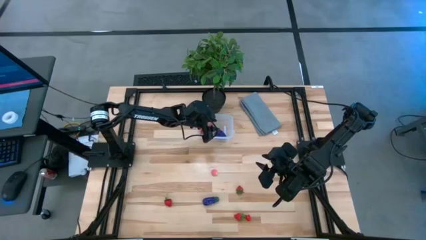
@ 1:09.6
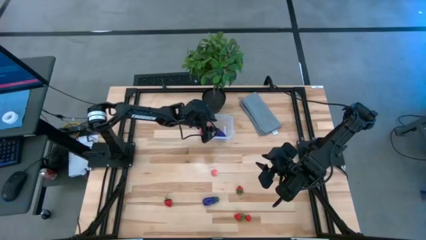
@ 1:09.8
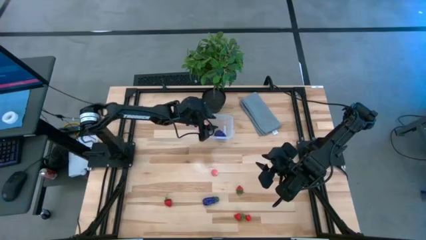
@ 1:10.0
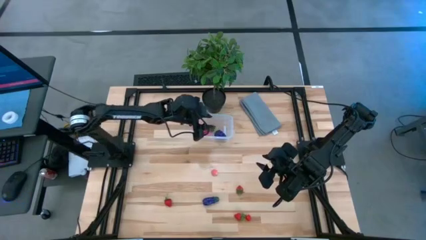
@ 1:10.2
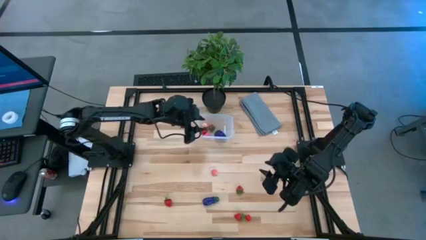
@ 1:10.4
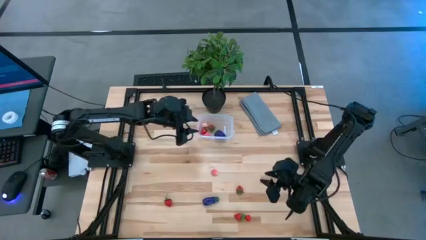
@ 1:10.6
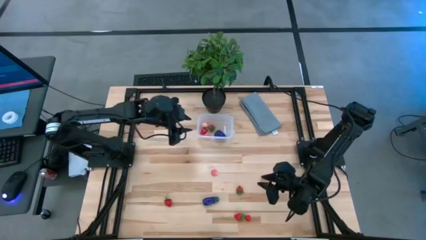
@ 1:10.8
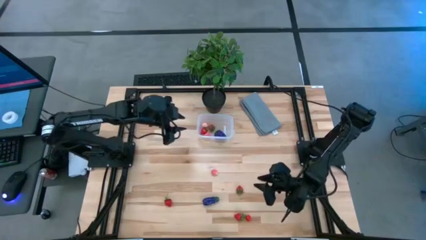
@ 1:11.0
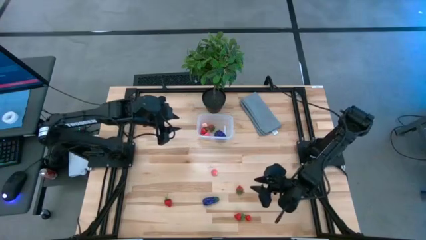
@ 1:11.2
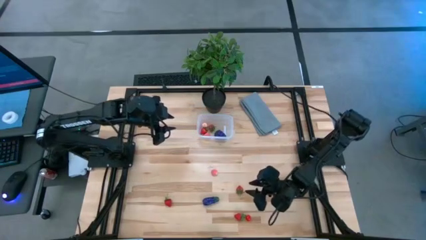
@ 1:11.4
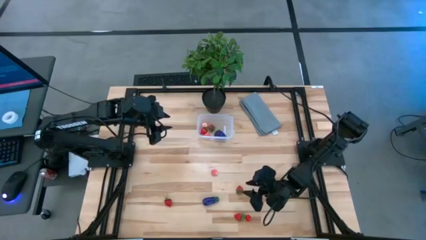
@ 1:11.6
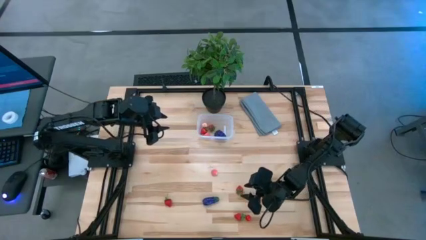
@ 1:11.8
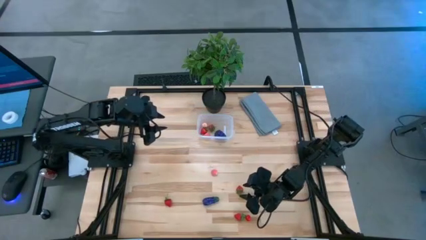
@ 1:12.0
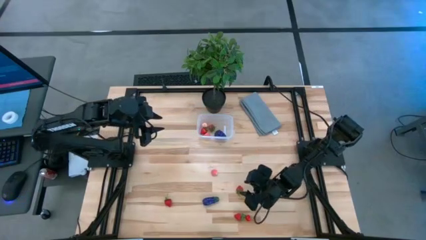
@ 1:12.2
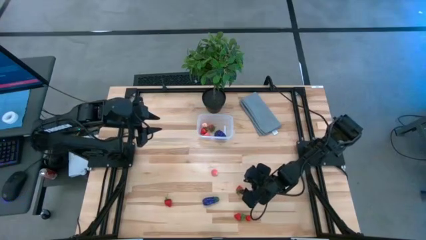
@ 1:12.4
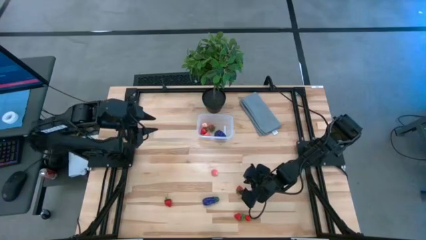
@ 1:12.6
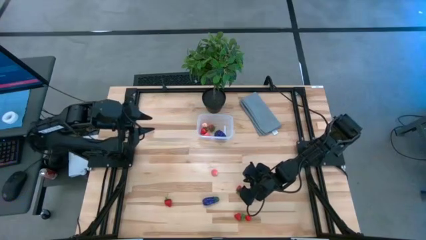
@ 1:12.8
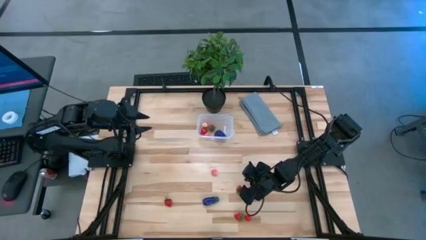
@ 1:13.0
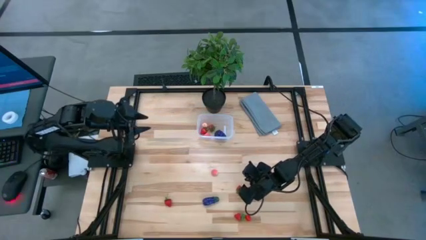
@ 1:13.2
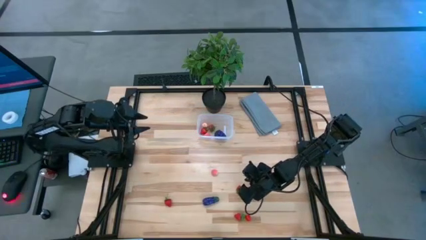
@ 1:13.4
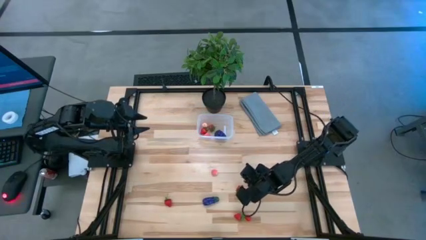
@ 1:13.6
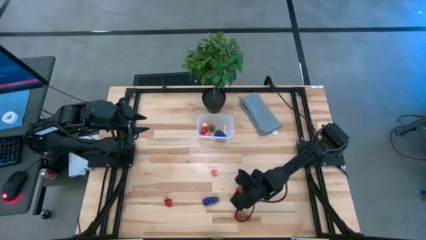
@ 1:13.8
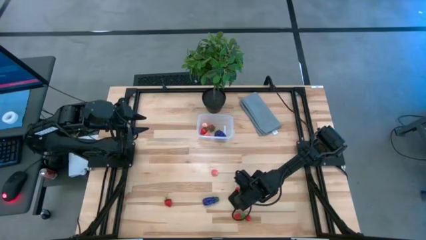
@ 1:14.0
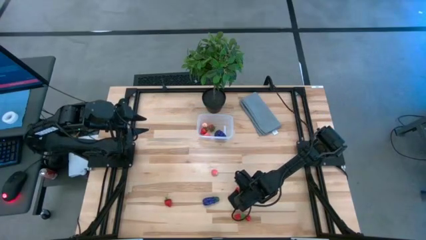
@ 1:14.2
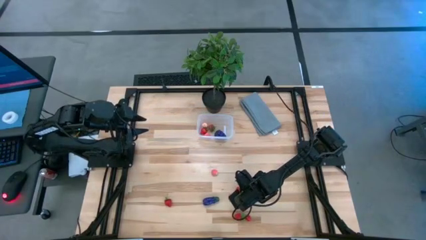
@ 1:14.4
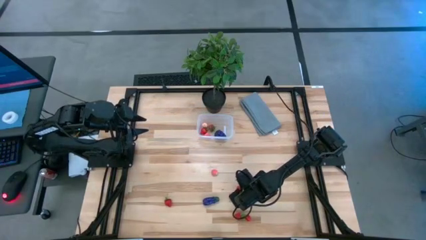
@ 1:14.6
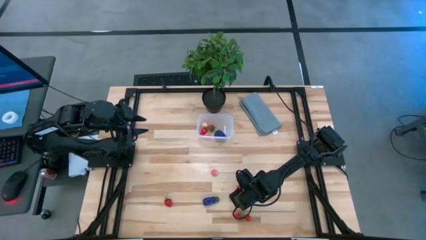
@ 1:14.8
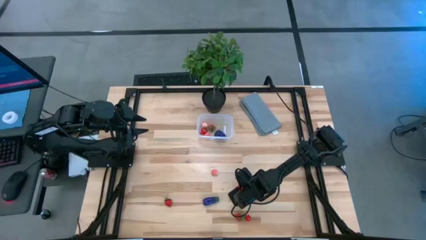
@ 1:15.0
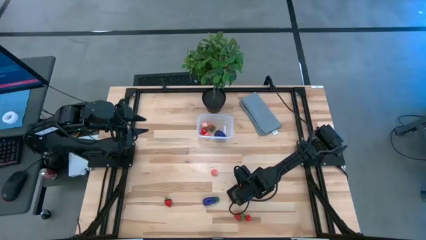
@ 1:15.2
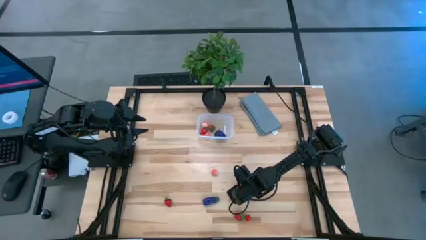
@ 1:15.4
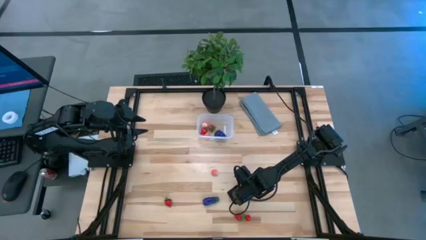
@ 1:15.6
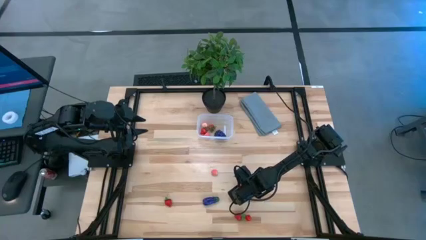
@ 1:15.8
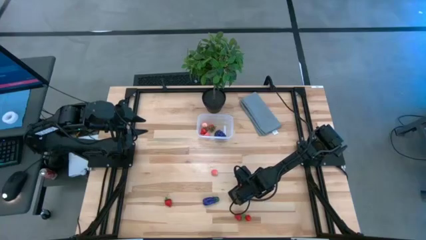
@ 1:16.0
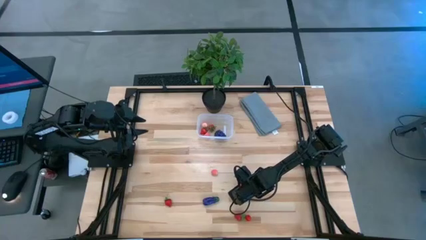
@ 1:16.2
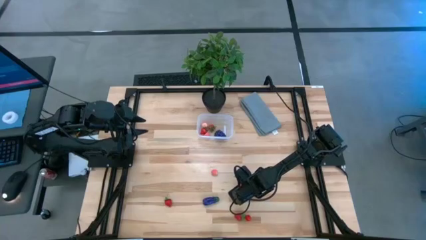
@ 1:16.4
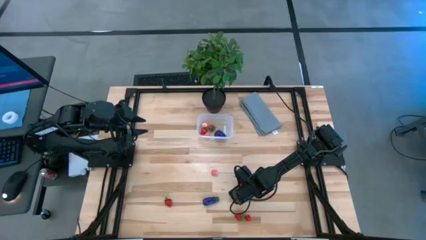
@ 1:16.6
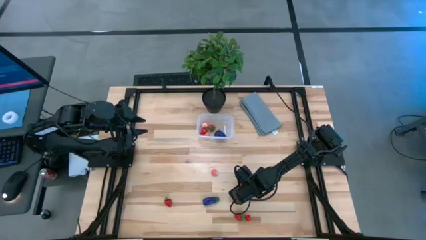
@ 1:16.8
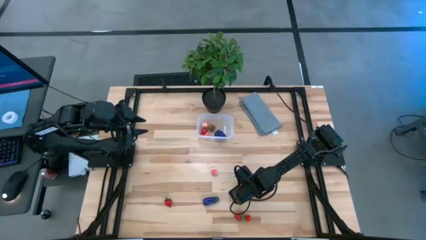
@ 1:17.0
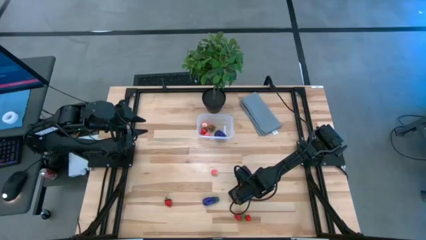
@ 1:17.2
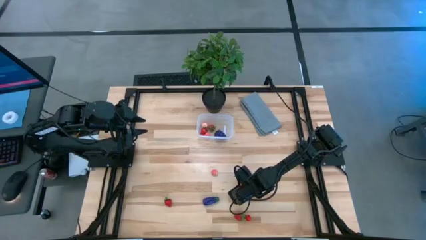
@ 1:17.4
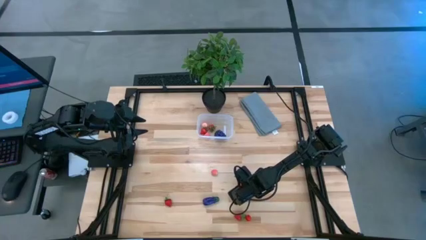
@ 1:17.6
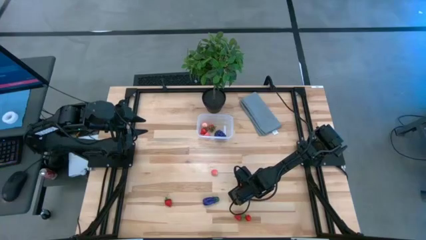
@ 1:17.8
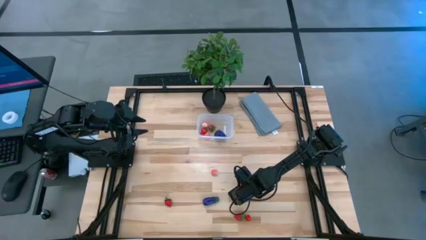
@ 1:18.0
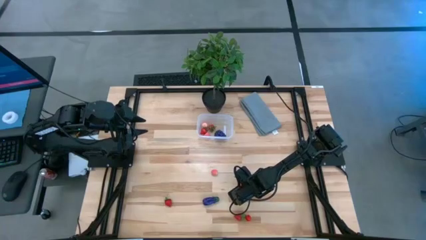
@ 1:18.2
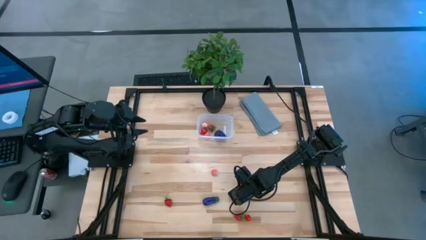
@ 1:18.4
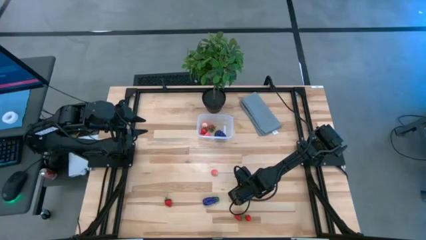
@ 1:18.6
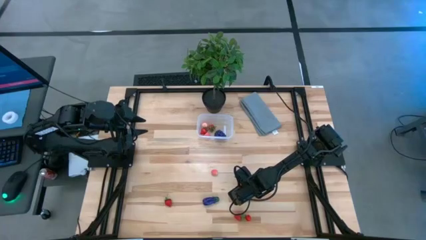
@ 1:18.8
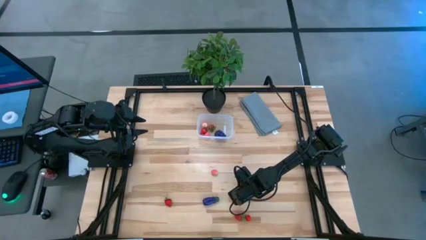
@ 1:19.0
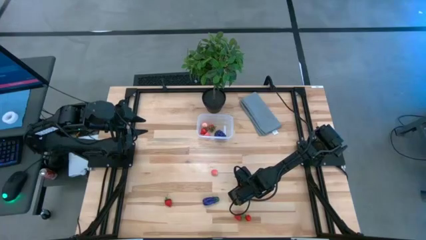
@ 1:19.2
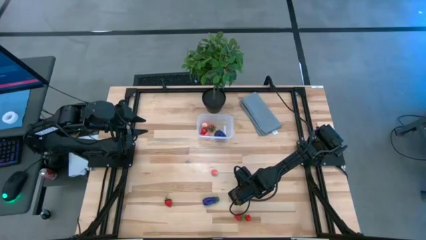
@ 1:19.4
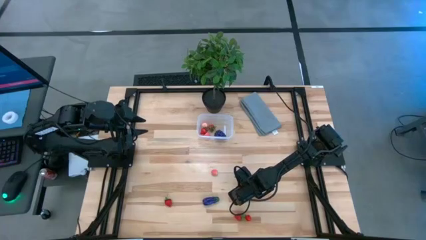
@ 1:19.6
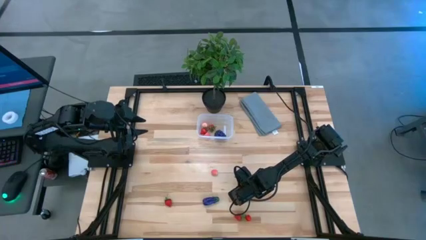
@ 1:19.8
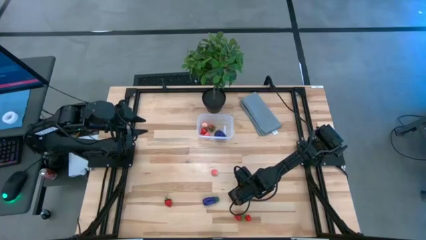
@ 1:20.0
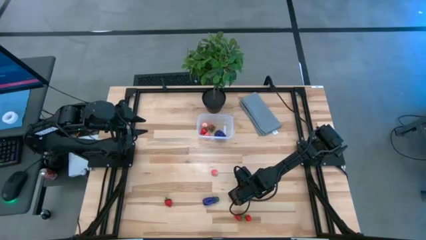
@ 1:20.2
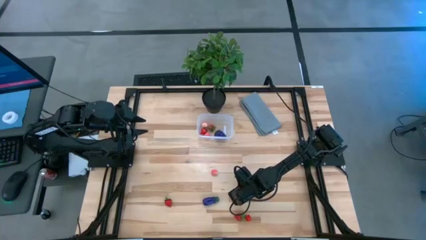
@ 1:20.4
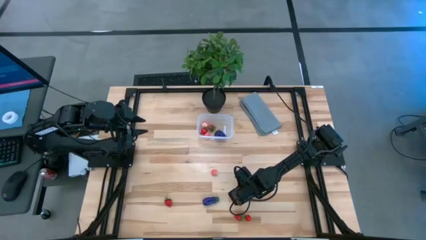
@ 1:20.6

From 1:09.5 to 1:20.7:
Task: Pick and placing Produce into tupperware
Put the top right red strawberry into the transparent bin
